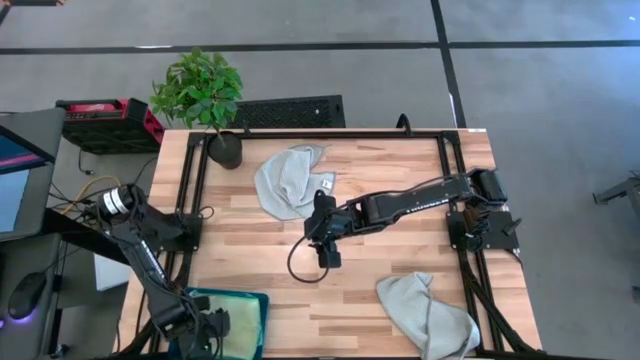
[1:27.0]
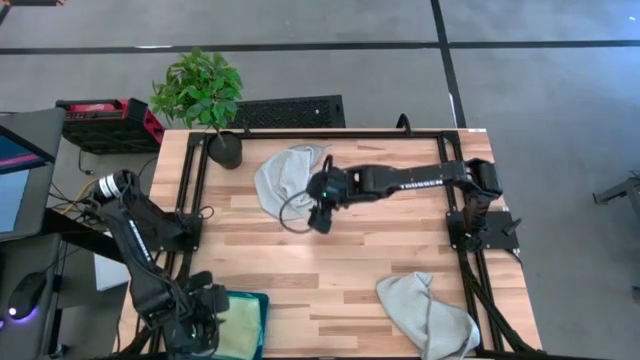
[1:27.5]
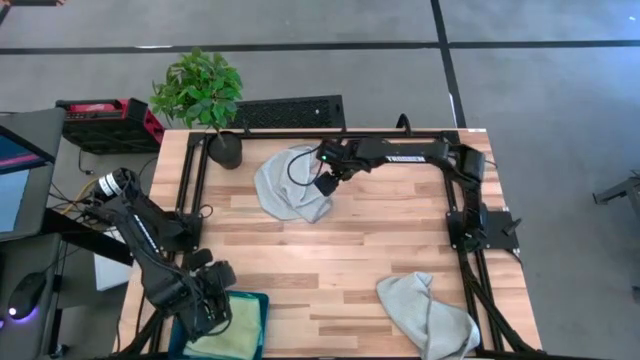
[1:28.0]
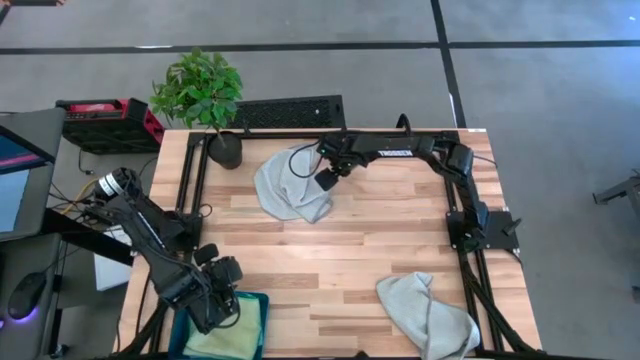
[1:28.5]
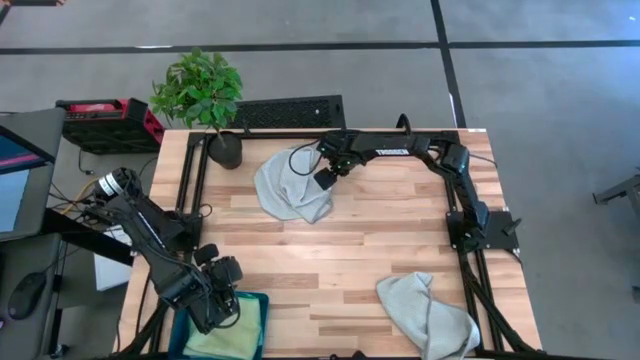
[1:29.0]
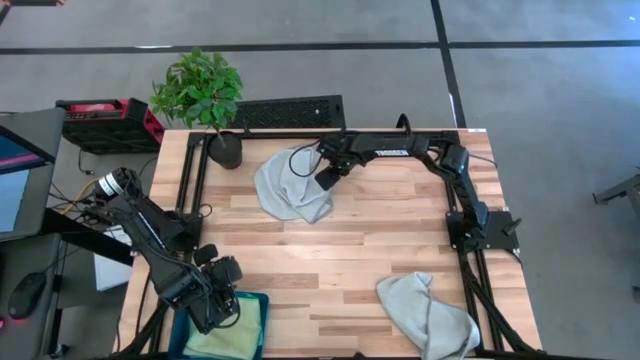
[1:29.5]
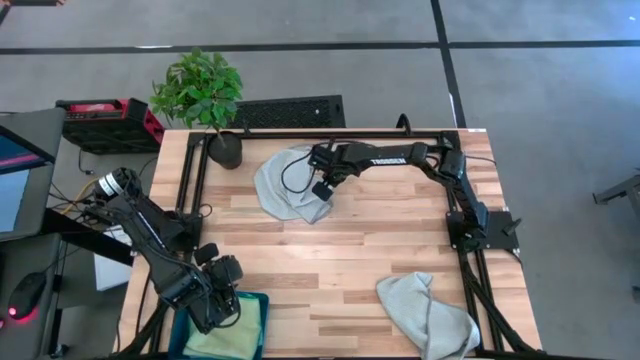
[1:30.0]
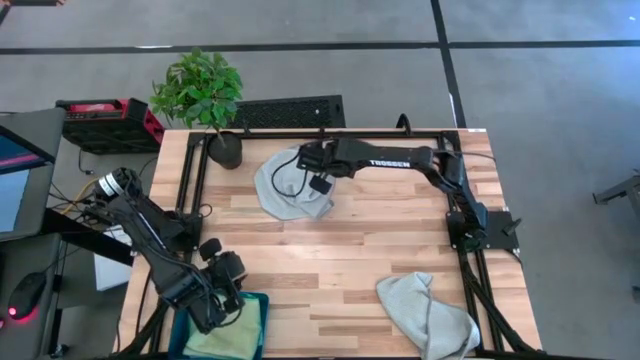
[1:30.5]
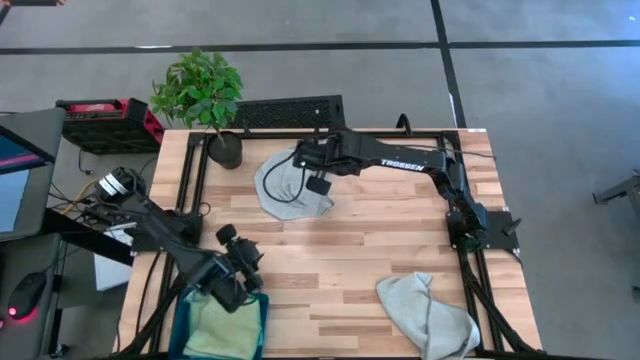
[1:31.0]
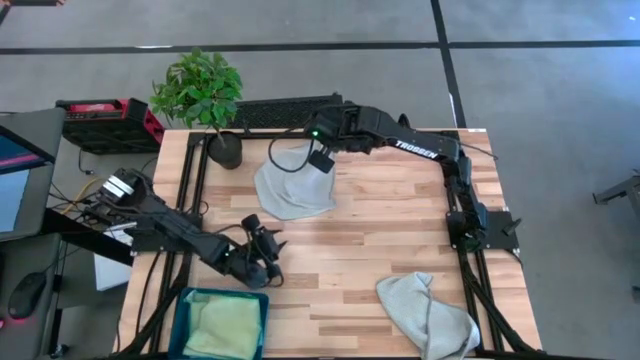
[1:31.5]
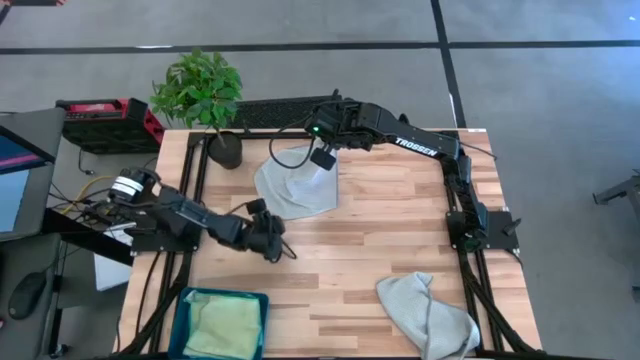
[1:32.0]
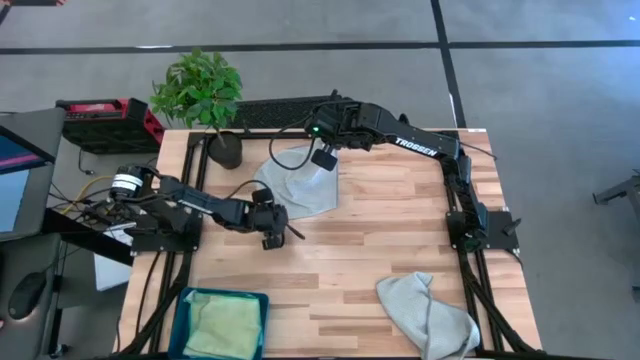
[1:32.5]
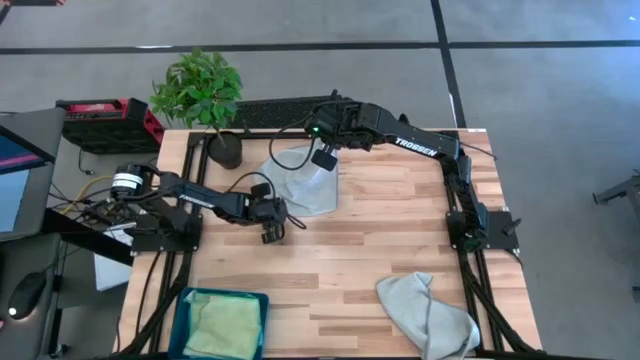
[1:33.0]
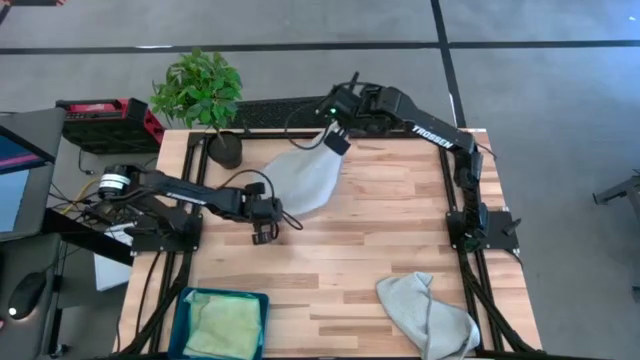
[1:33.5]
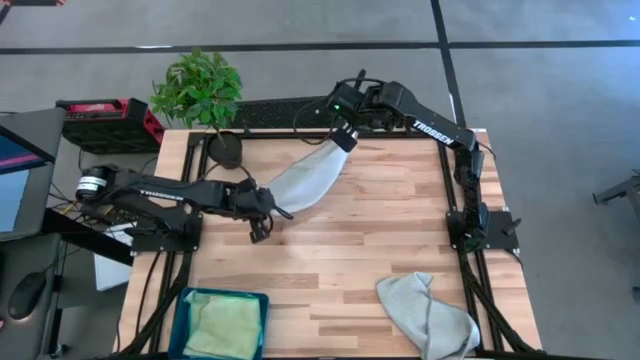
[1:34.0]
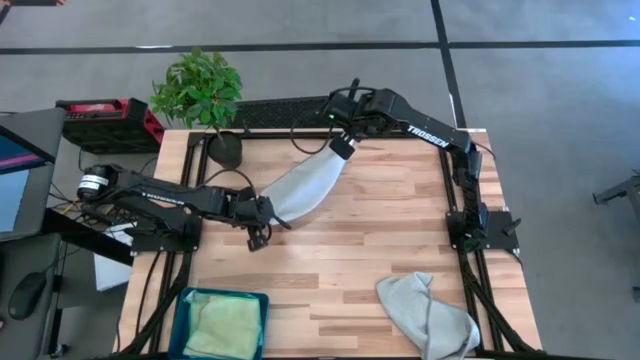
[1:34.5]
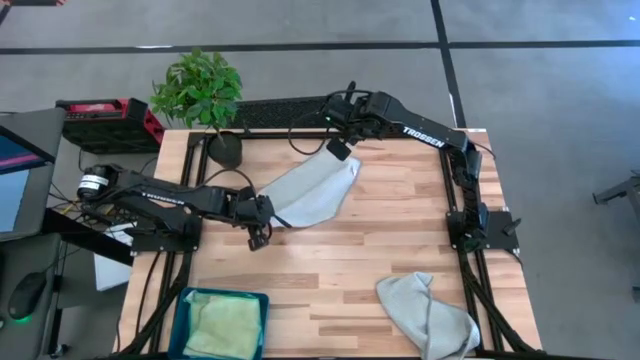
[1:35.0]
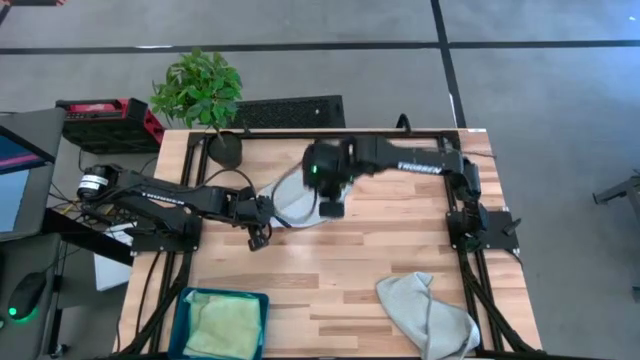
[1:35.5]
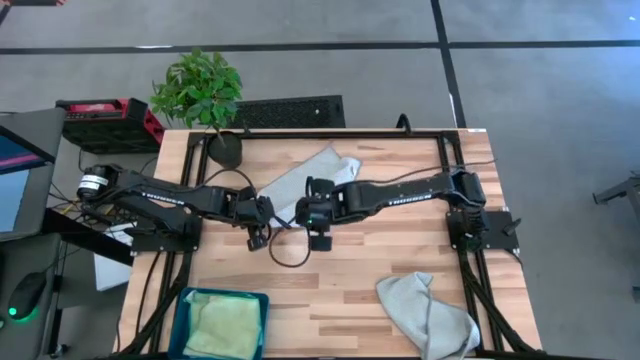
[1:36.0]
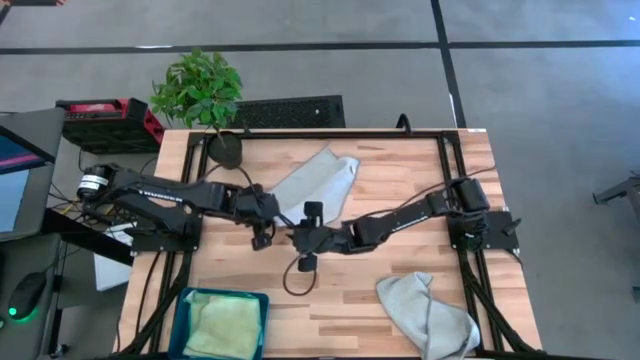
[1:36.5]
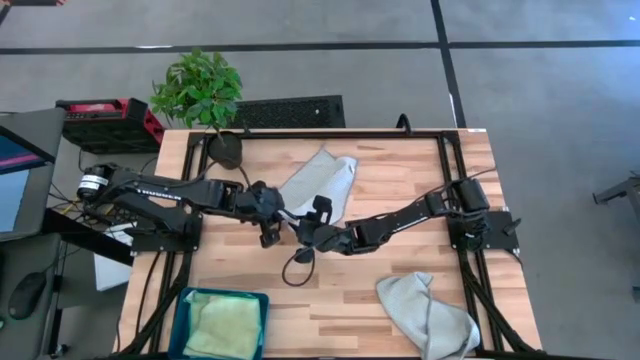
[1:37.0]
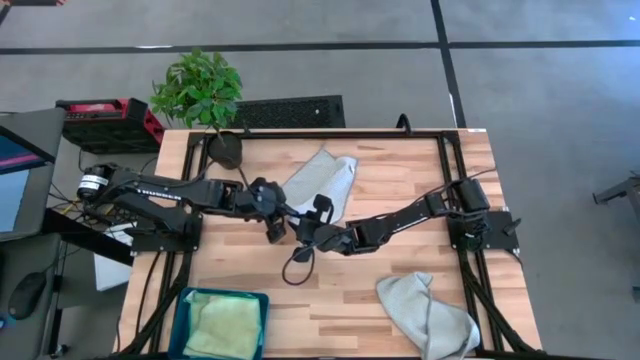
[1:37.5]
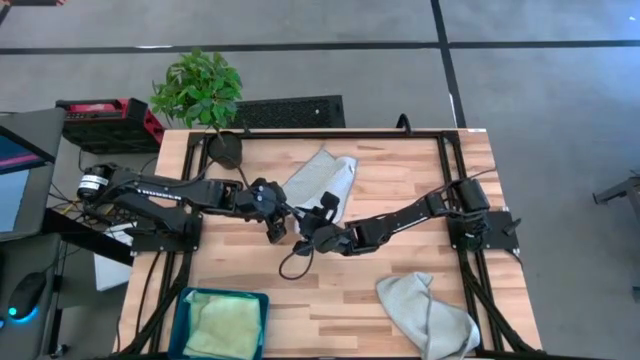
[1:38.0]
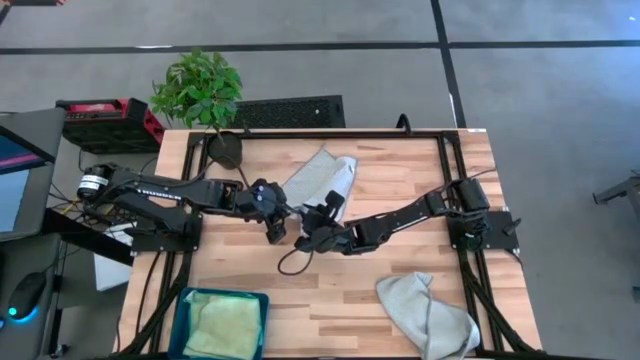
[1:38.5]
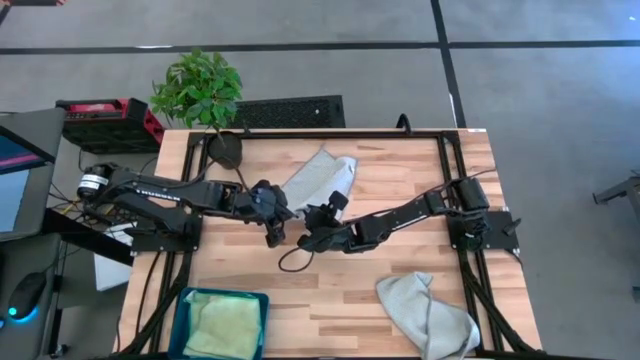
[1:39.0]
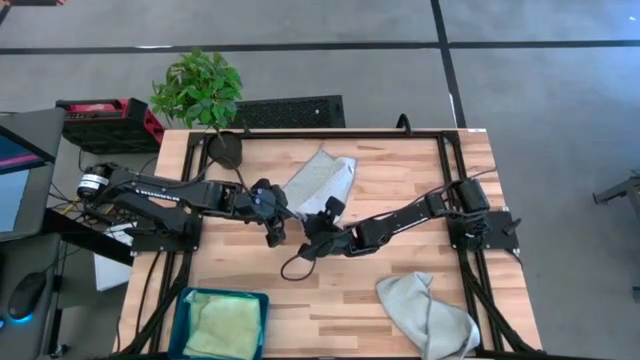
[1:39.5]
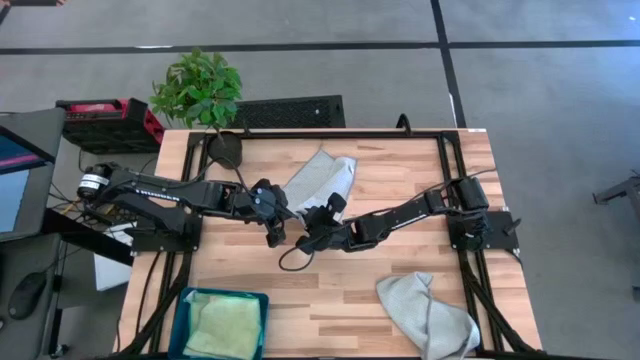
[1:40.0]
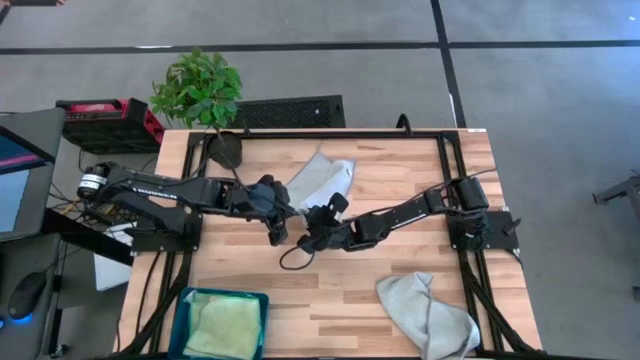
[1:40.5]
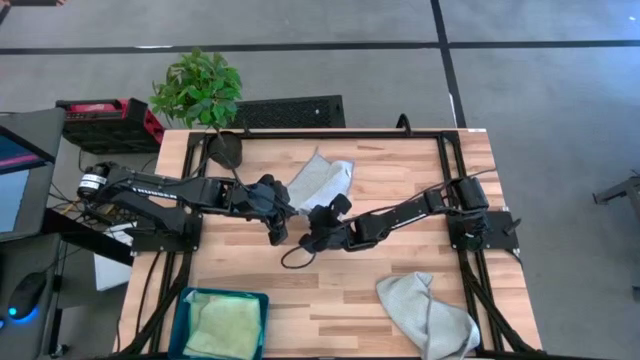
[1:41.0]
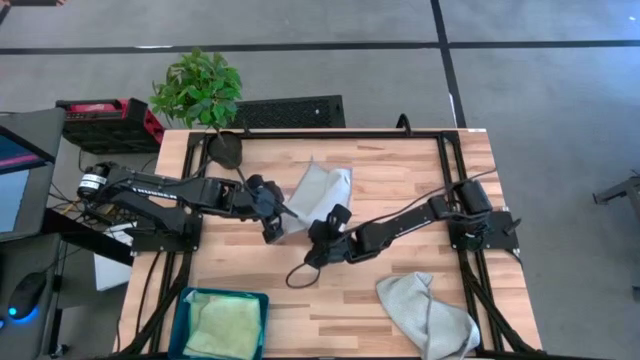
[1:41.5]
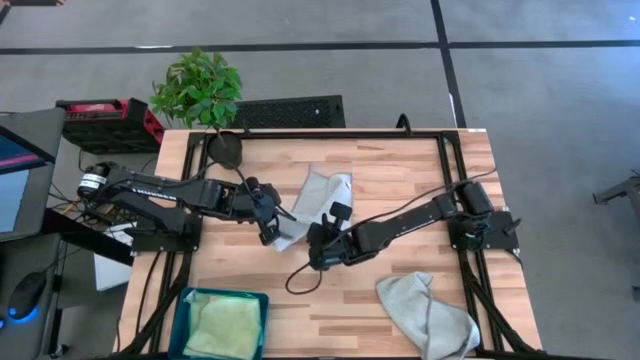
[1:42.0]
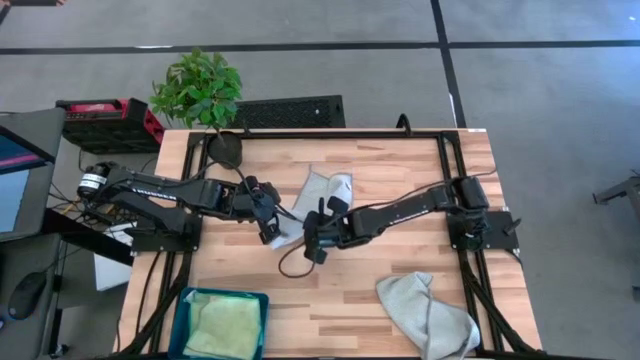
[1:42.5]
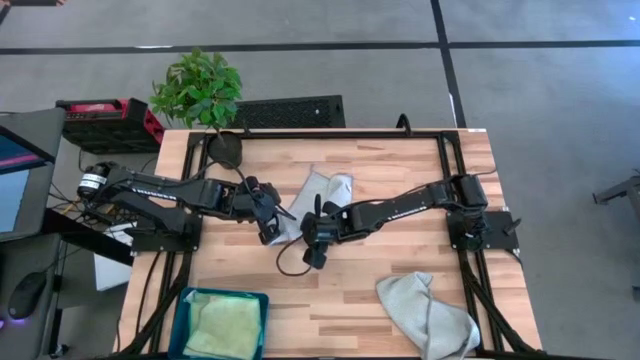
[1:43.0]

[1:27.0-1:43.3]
Task: Fold microfiber towels
Fold the top grey microfiber cloth

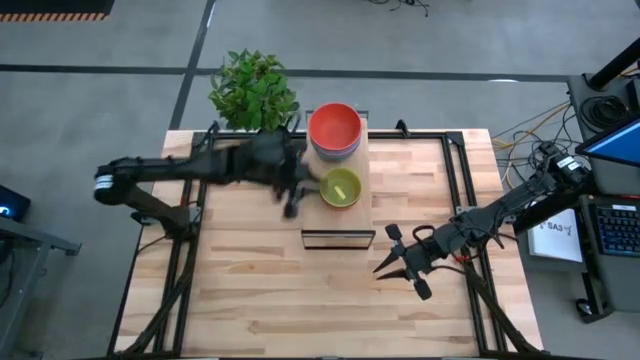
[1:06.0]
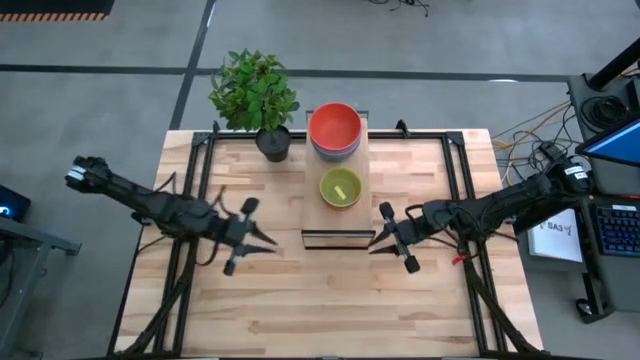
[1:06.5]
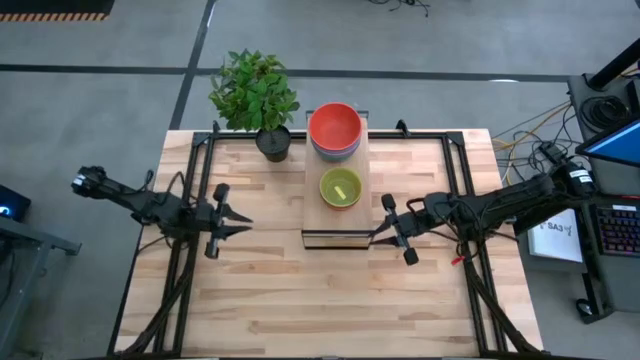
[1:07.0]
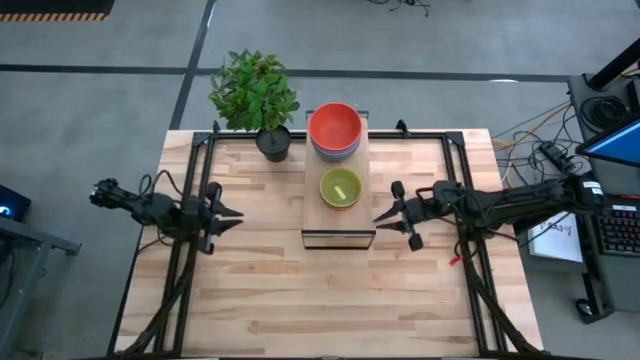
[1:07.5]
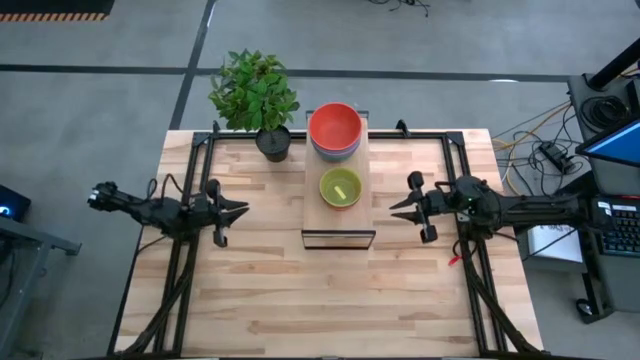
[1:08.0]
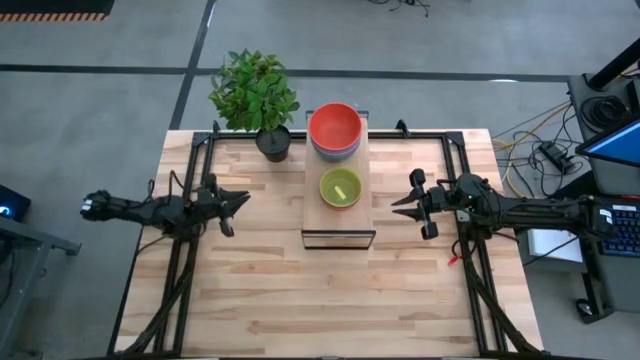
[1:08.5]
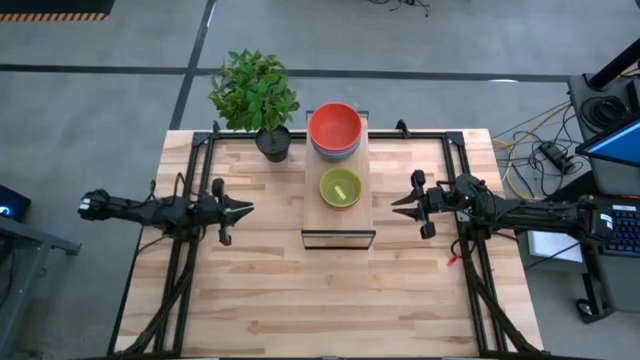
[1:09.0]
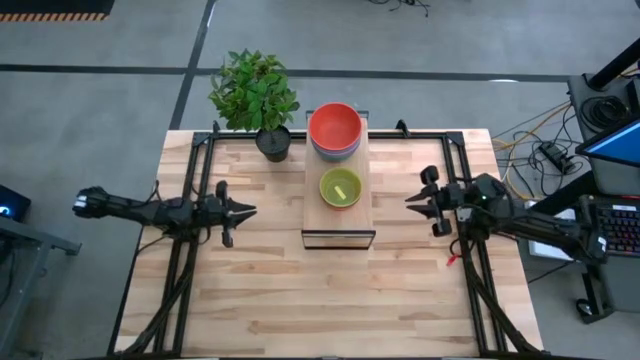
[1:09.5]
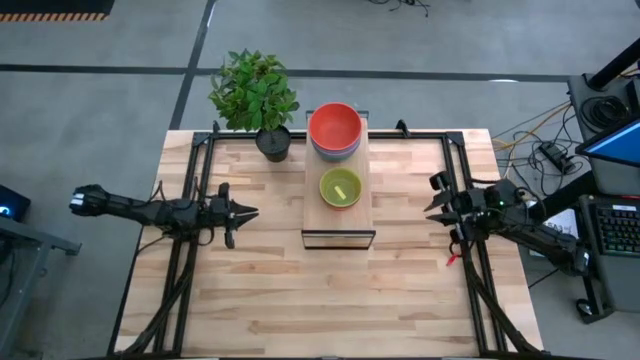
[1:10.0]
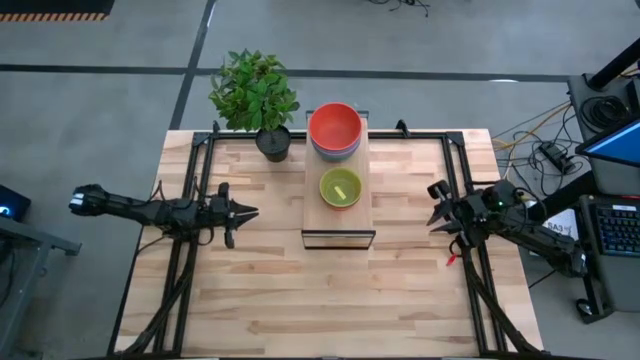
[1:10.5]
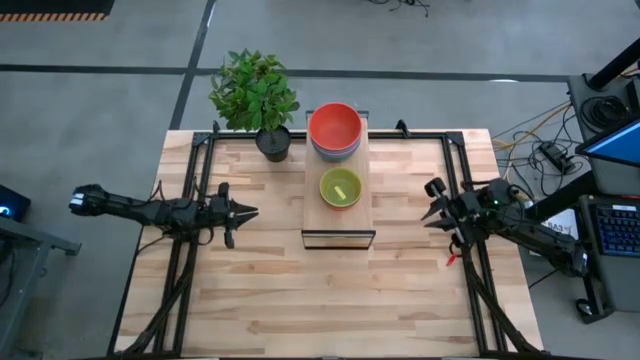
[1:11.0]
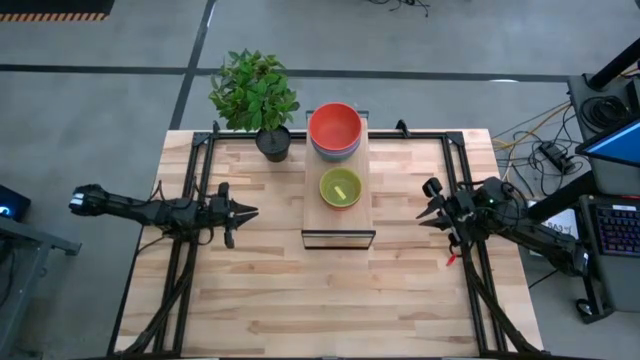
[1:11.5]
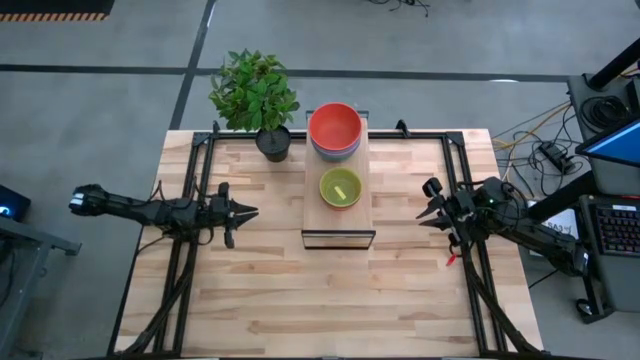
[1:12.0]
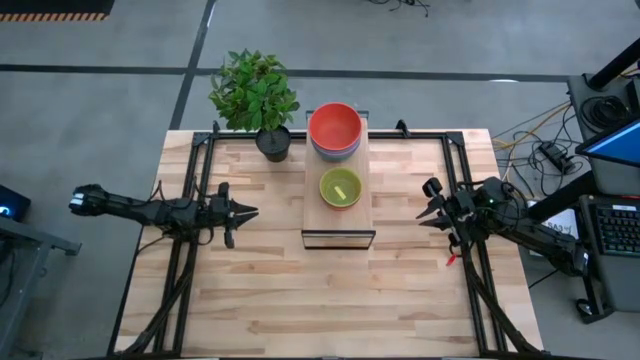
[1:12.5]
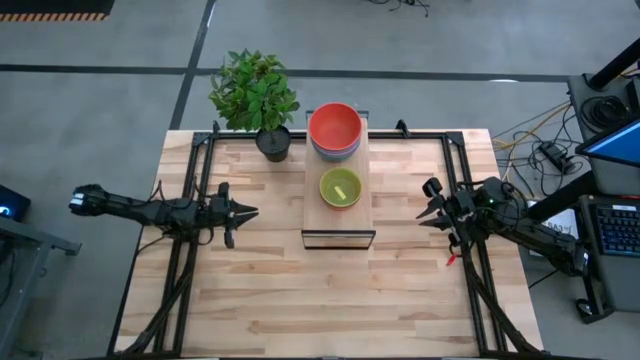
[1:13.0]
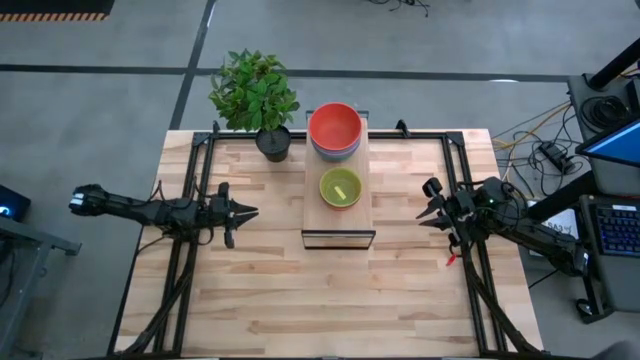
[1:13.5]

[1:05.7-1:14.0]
Task: Place and stack bowls onto a shelf
Return to Home Position
